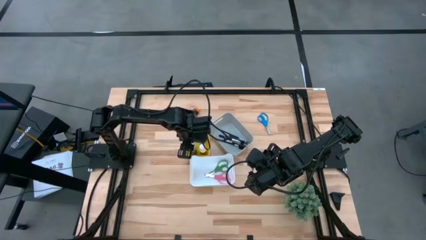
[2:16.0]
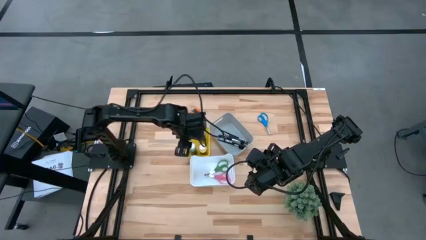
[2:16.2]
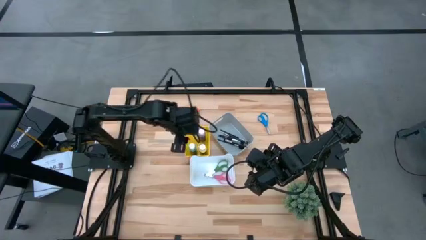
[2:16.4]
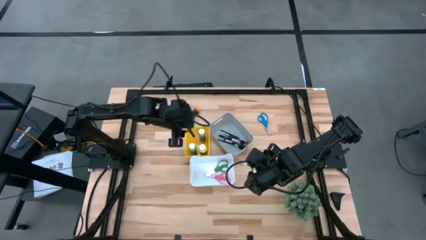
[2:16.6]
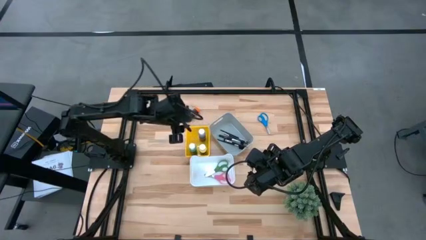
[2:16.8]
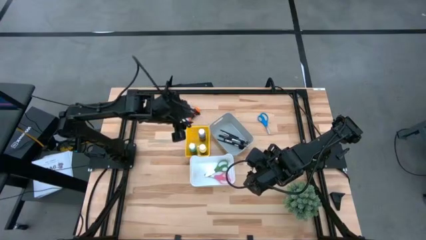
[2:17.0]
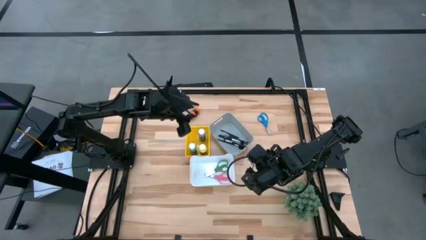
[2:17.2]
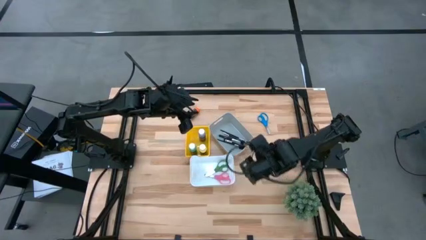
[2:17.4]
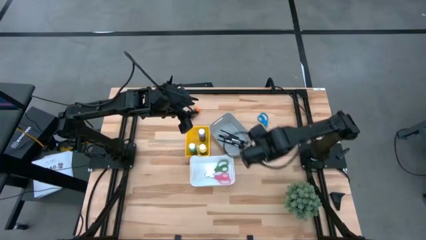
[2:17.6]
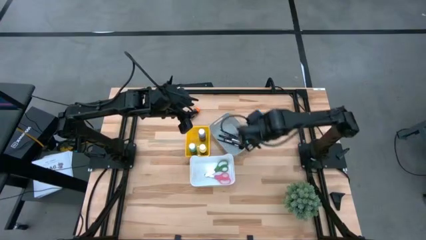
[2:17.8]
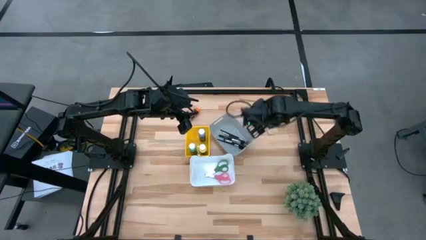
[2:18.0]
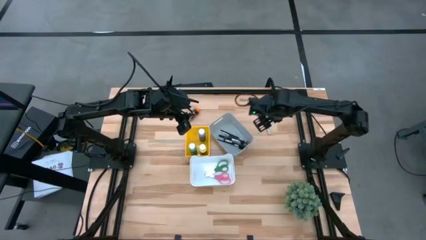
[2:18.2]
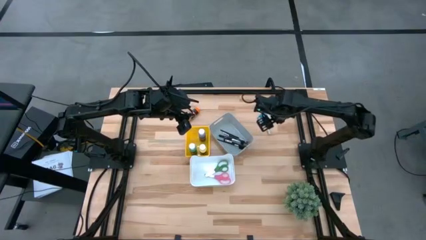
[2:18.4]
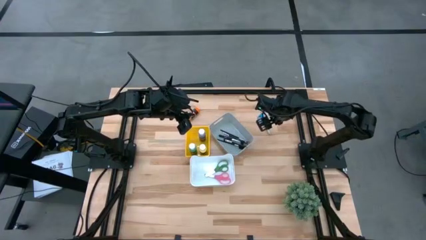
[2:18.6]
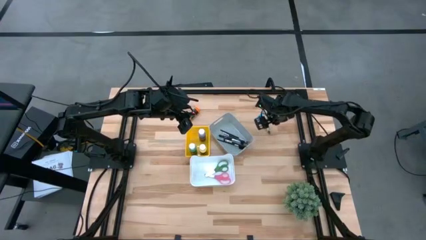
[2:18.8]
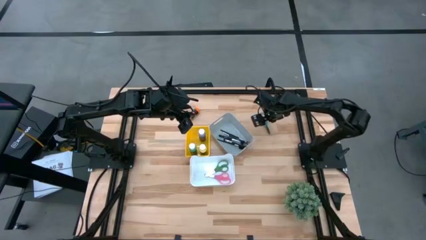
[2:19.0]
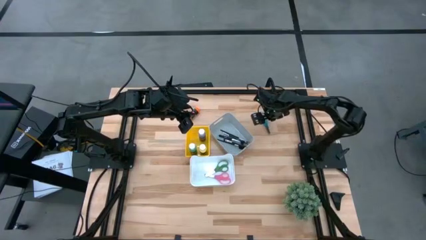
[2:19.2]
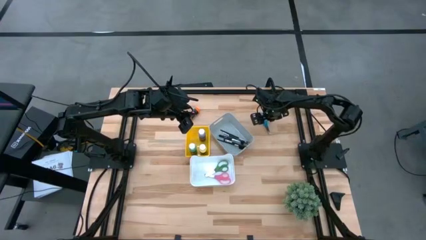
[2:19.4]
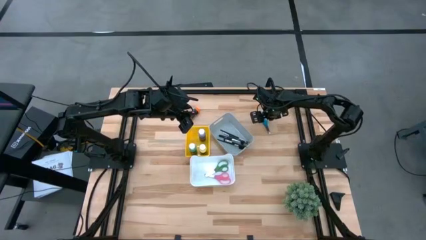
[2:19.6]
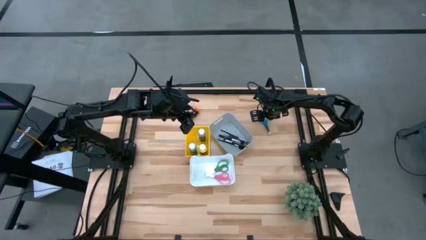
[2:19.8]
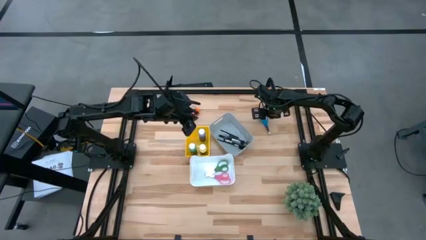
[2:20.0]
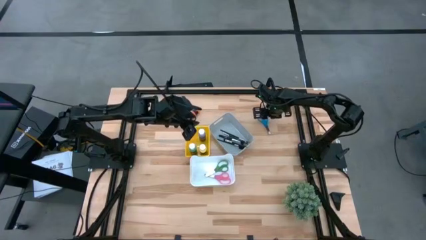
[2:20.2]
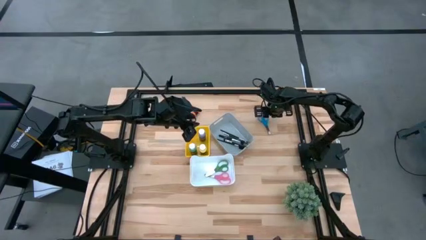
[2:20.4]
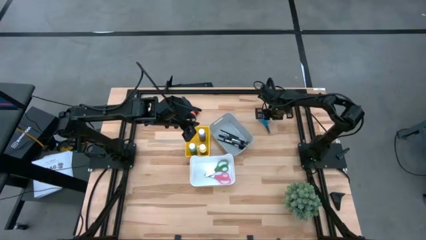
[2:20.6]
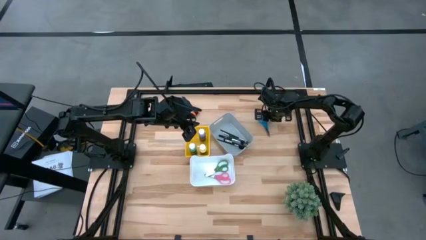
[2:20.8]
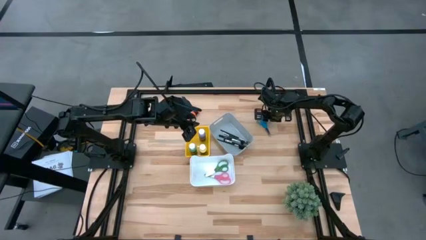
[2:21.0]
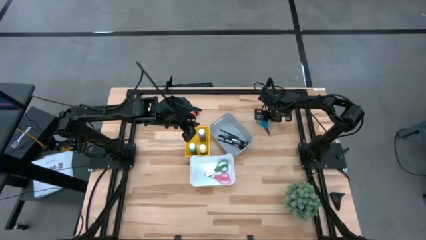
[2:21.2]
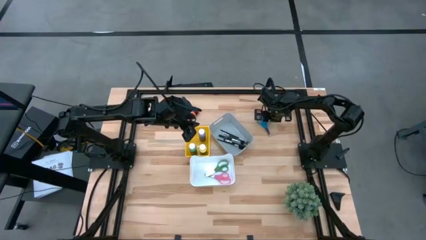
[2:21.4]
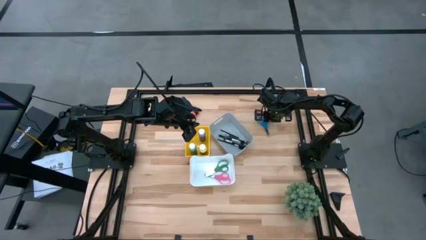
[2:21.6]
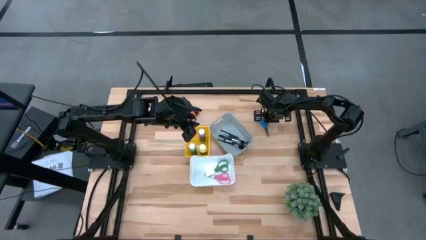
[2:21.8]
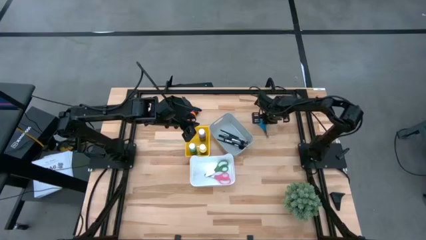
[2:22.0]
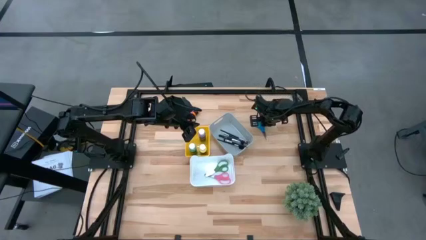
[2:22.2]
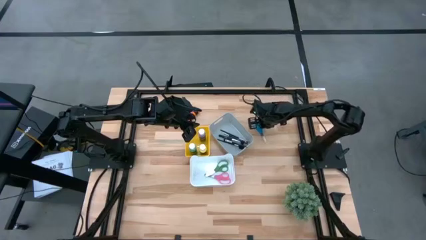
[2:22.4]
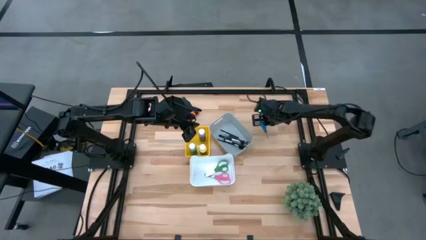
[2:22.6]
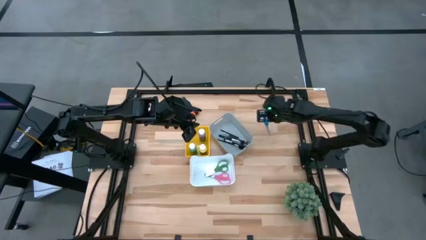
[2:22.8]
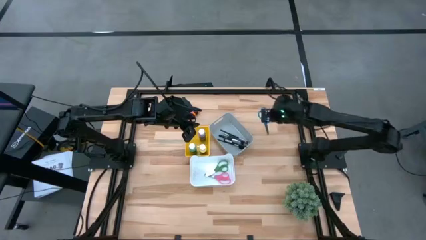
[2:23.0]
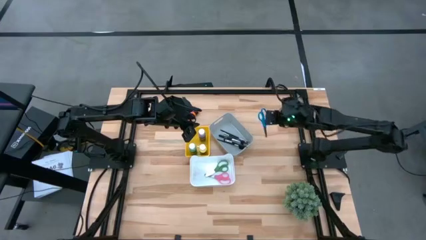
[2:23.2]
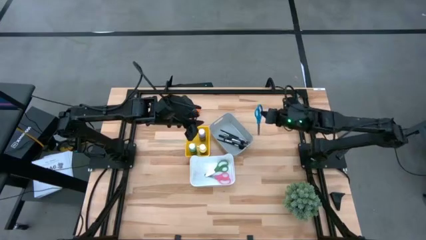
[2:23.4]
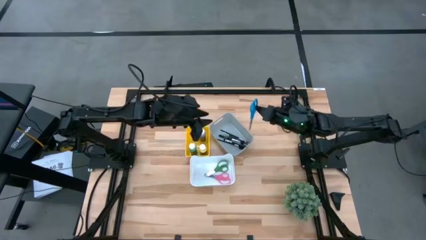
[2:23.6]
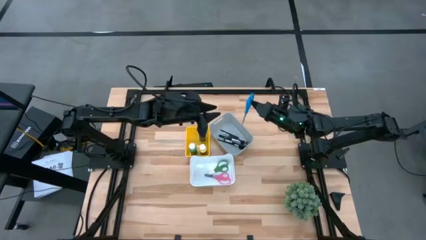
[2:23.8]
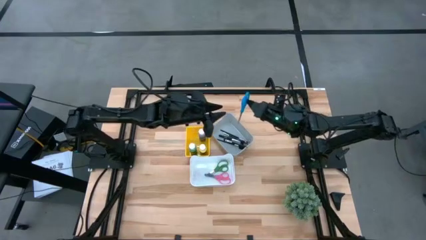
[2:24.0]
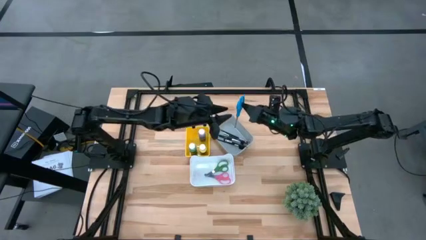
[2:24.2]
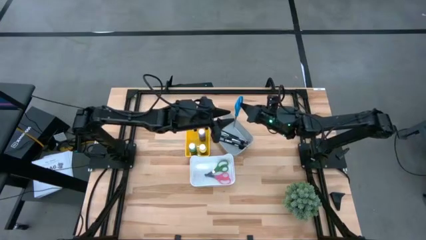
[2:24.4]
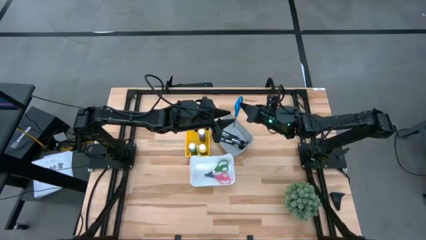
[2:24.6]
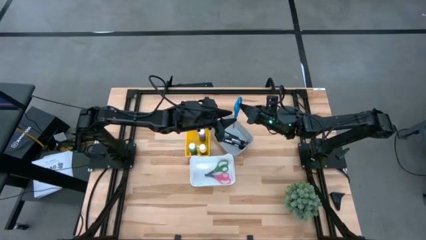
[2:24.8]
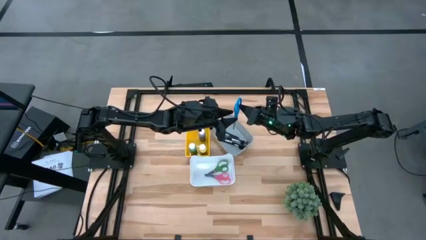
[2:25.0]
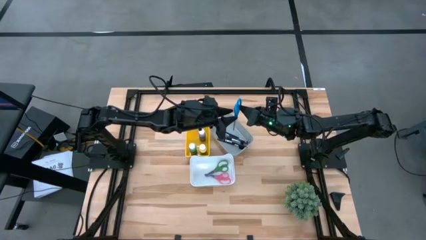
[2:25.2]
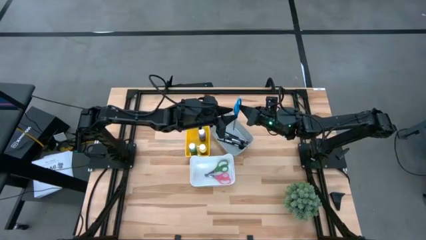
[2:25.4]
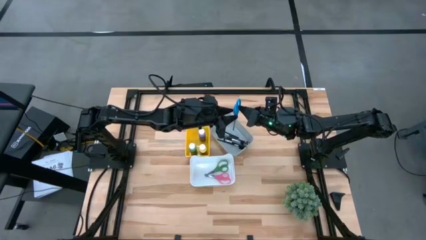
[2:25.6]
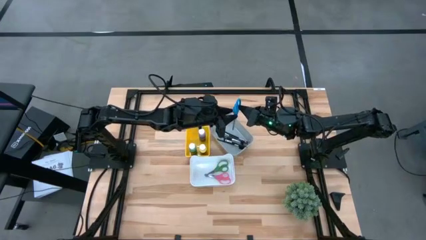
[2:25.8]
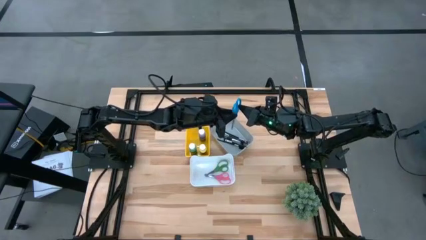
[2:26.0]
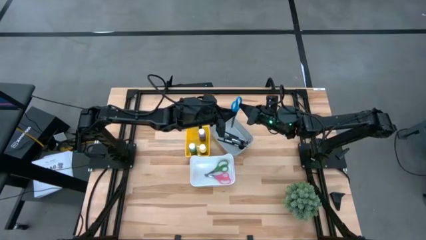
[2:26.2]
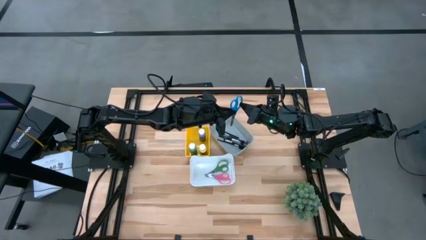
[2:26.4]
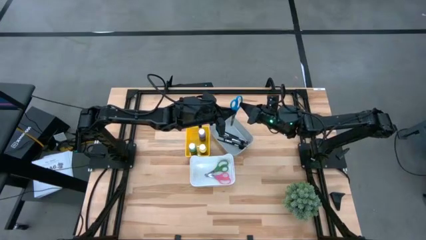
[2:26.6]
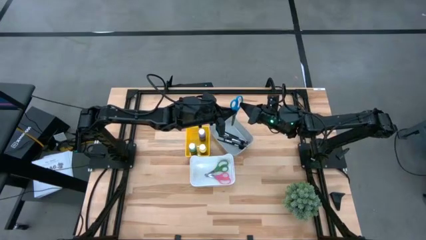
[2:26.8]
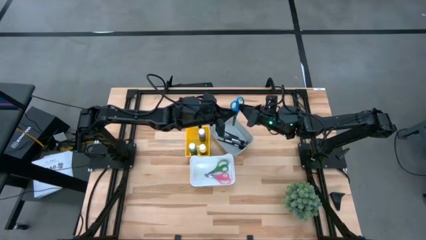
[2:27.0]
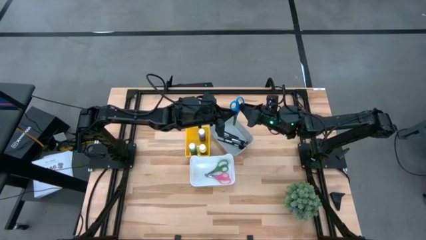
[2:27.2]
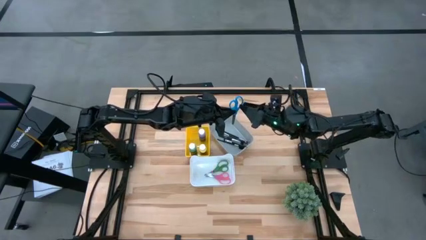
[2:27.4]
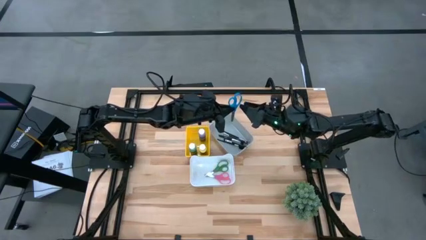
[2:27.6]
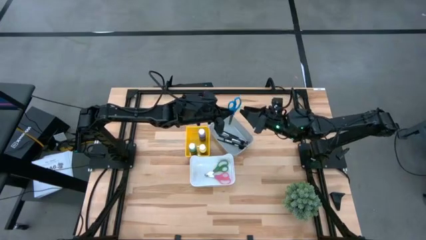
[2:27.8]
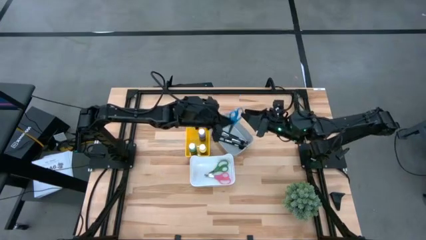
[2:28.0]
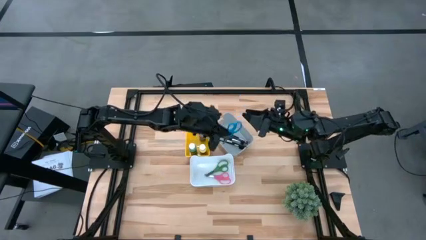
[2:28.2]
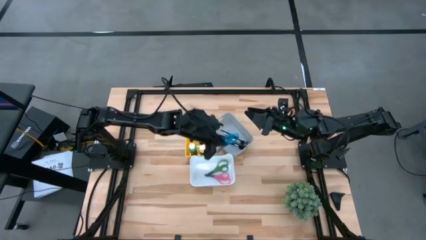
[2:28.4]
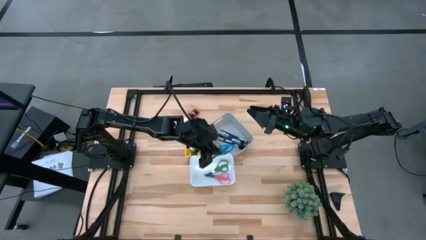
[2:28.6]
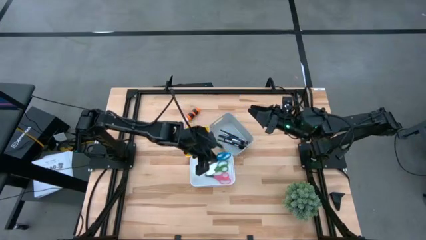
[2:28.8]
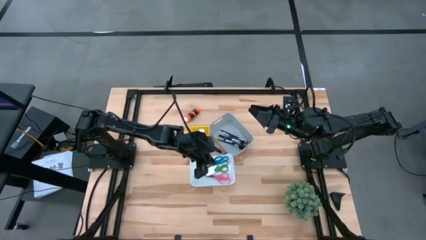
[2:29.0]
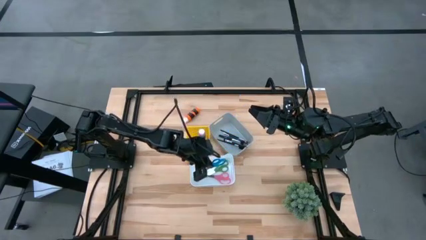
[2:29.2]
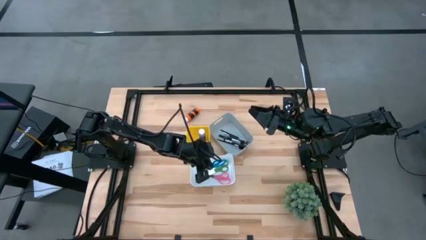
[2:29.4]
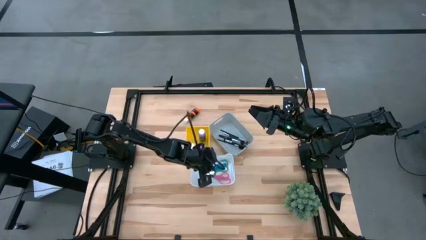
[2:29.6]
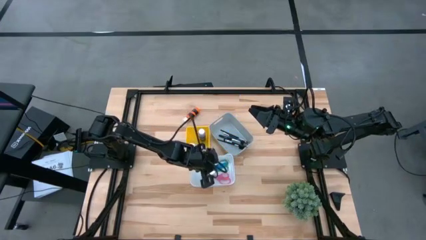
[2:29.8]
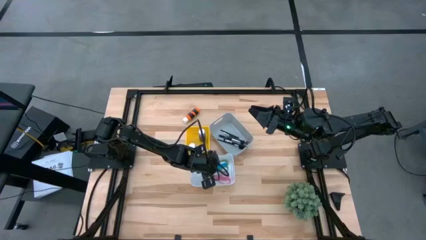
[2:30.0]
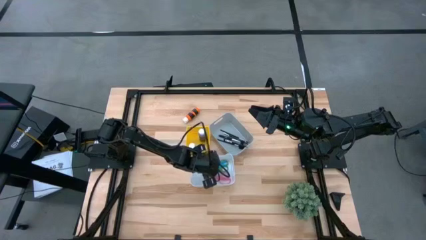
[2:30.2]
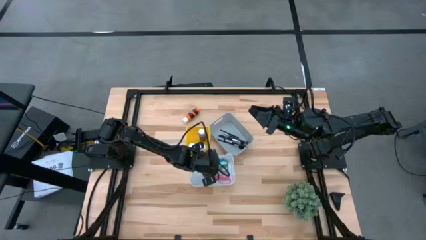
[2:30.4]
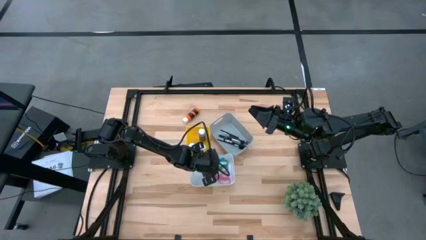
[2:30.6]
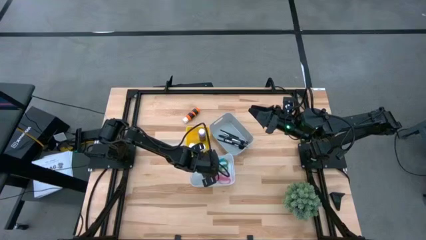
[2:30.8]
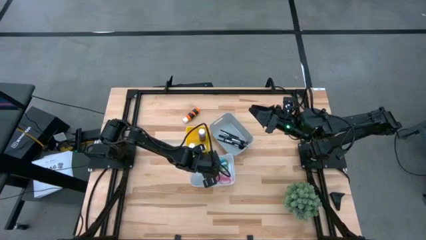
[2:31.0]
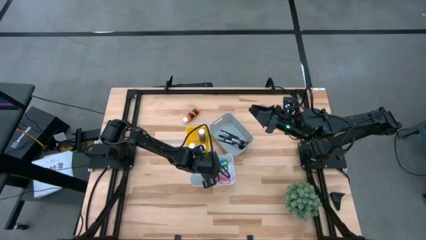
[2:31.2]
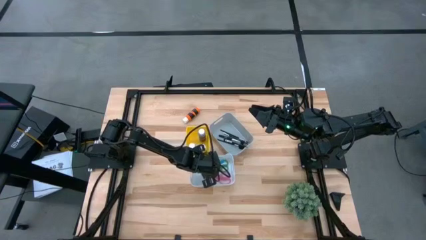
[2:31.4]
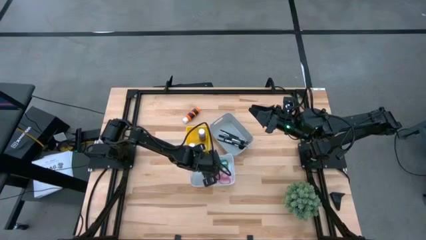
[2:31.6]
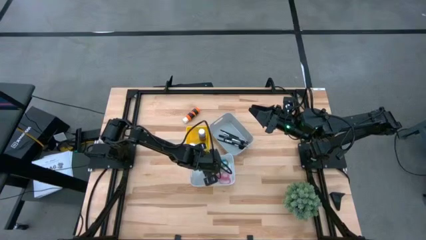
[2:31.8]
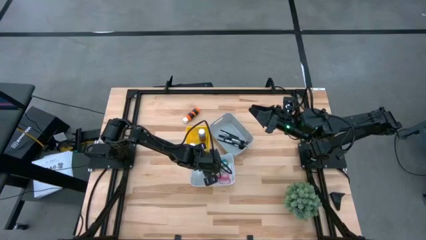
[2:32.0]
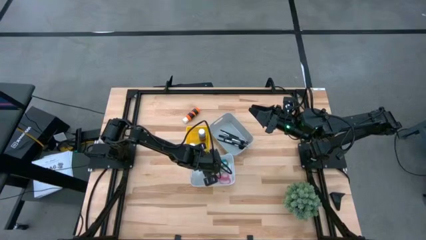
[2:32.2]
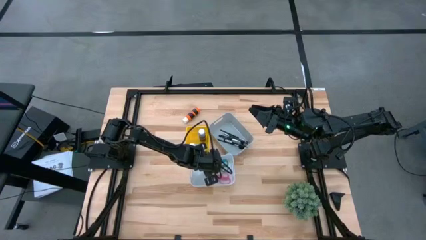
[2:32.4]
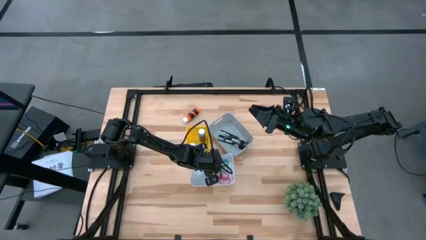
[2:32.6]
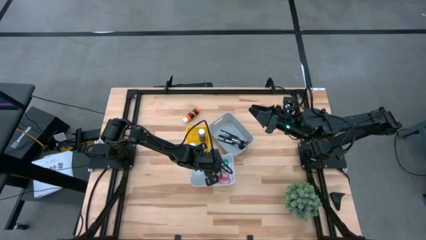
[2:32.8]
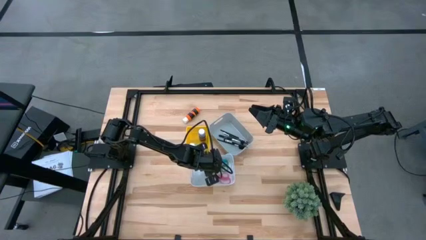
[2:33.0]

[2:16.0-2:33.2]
Task: Pick & Place Paint Supplies
Put the blue scissors into the white bin
